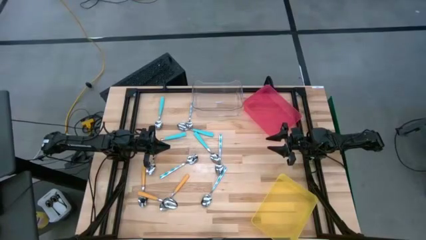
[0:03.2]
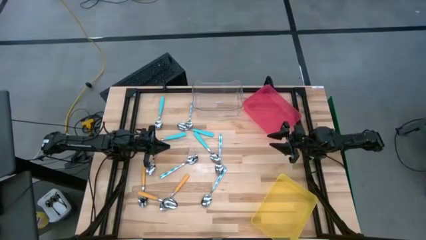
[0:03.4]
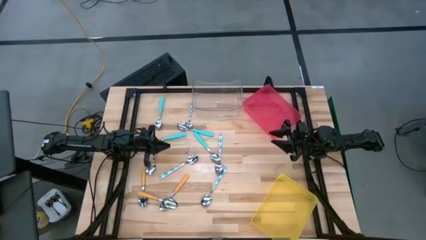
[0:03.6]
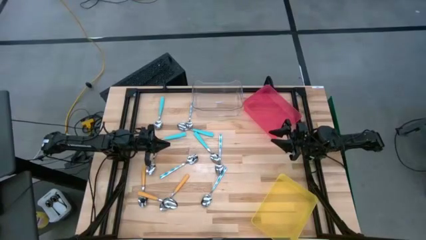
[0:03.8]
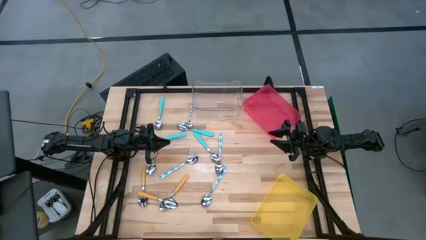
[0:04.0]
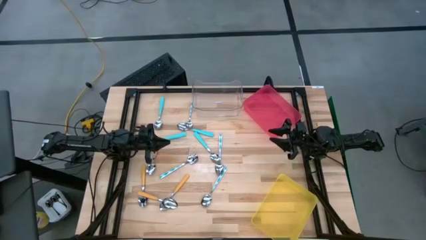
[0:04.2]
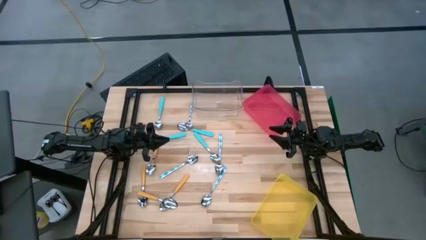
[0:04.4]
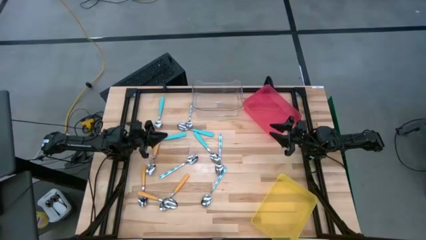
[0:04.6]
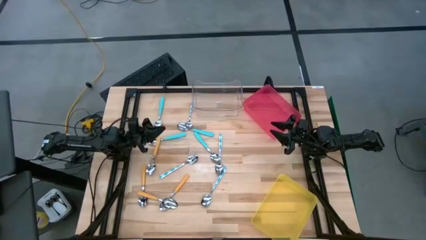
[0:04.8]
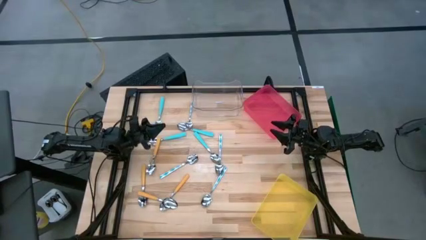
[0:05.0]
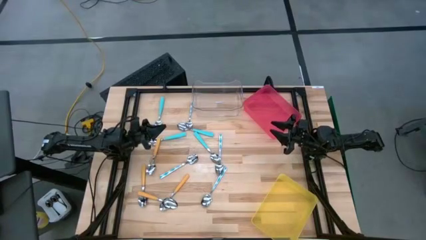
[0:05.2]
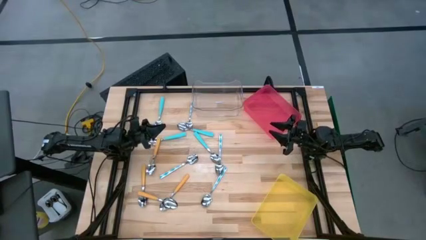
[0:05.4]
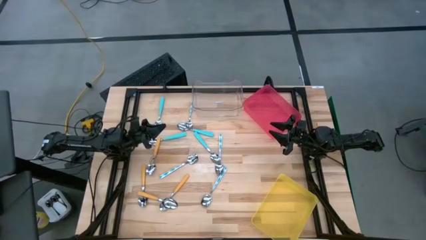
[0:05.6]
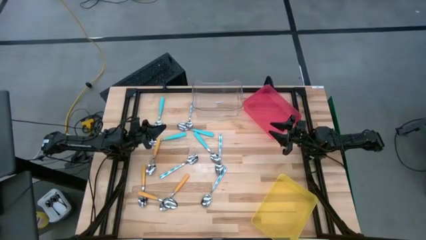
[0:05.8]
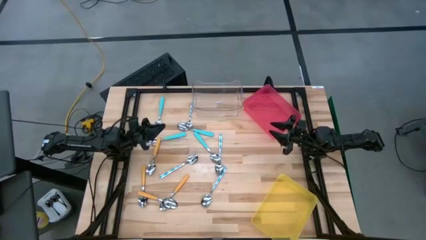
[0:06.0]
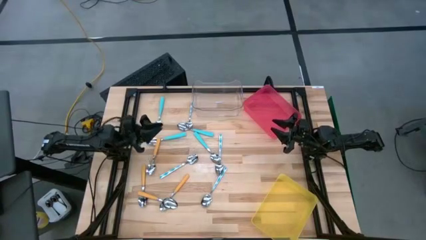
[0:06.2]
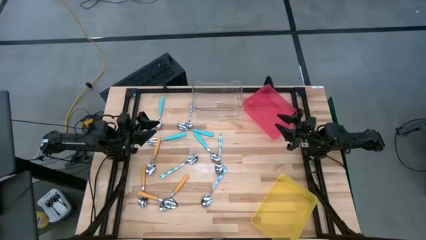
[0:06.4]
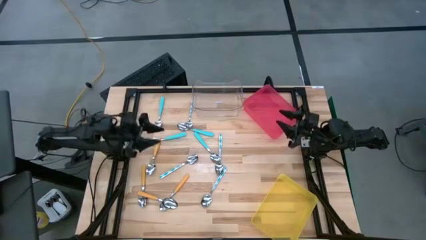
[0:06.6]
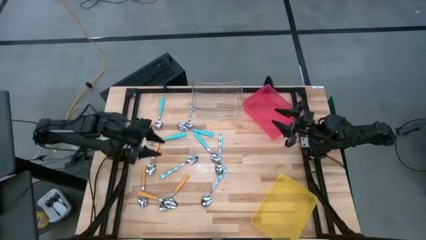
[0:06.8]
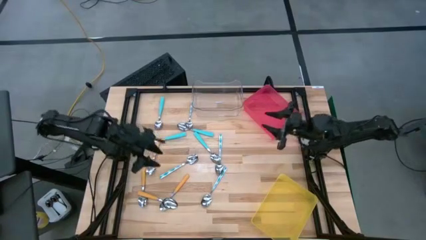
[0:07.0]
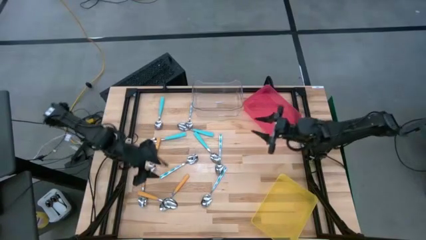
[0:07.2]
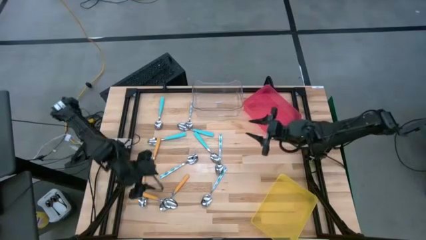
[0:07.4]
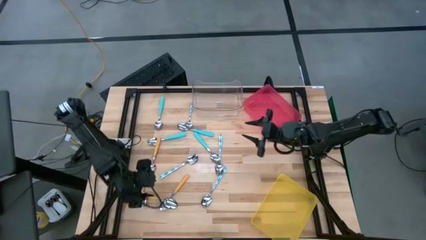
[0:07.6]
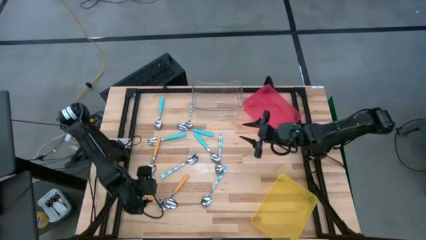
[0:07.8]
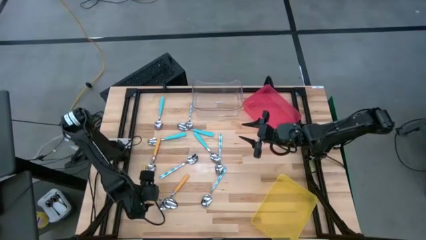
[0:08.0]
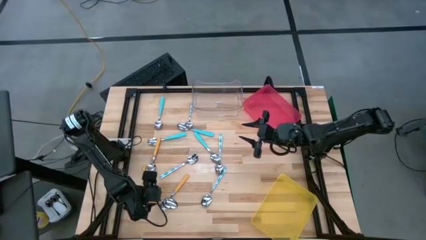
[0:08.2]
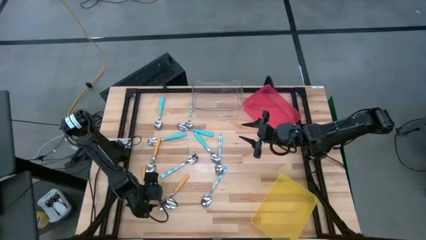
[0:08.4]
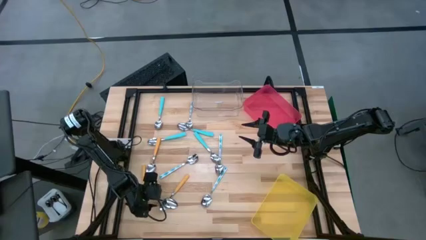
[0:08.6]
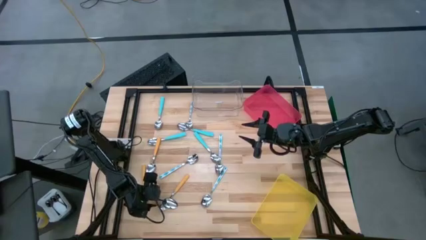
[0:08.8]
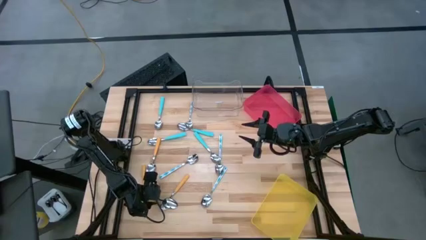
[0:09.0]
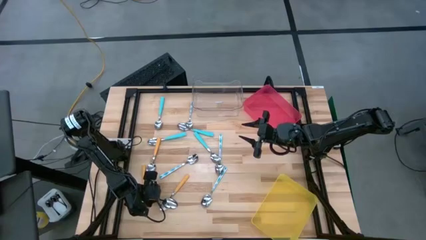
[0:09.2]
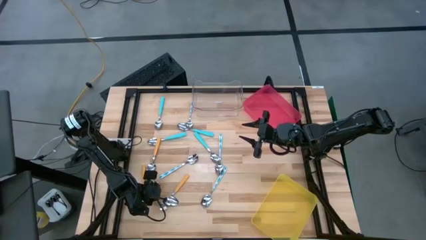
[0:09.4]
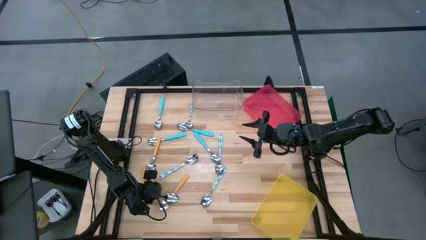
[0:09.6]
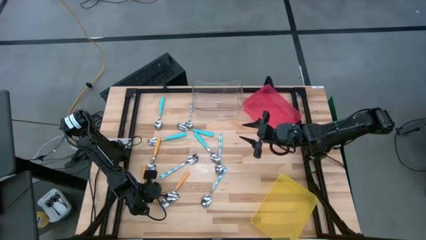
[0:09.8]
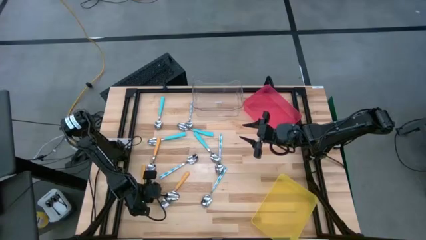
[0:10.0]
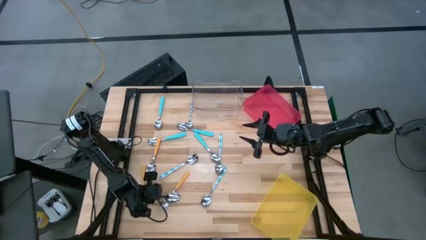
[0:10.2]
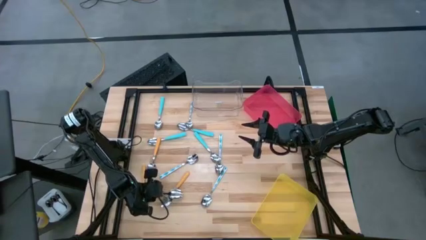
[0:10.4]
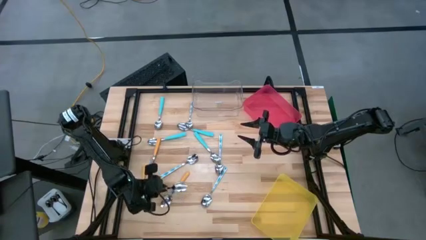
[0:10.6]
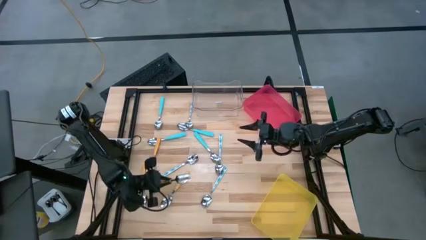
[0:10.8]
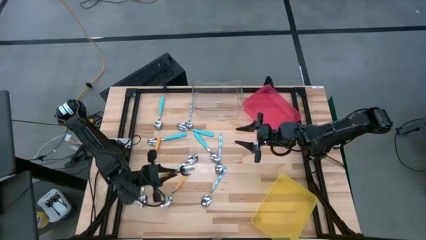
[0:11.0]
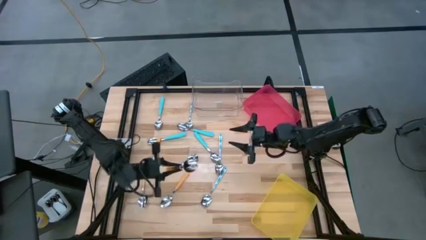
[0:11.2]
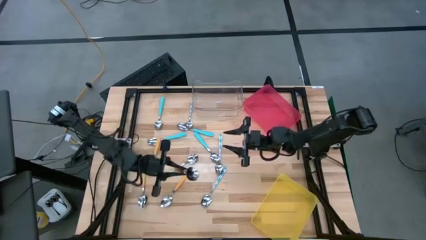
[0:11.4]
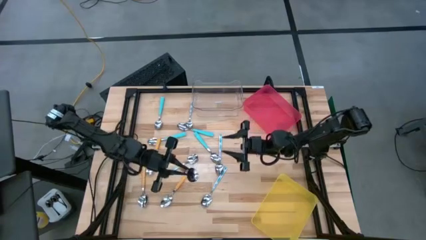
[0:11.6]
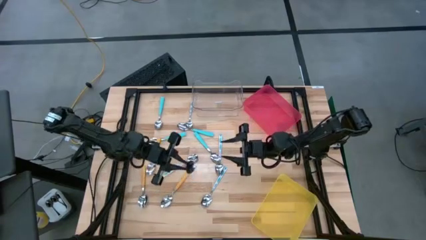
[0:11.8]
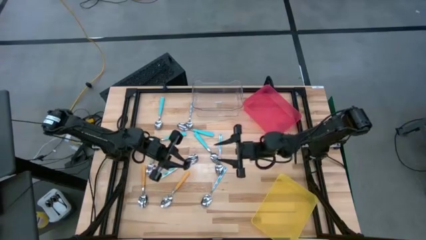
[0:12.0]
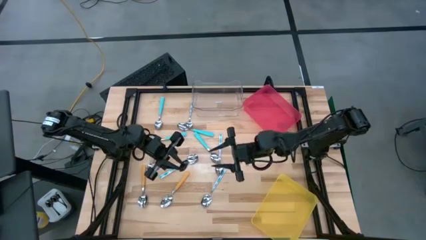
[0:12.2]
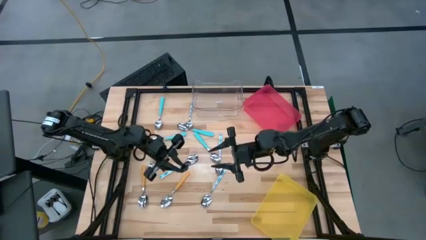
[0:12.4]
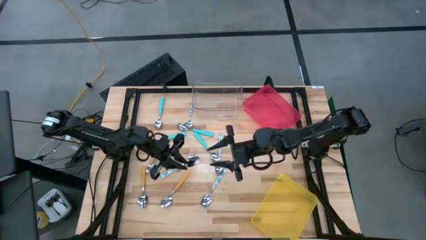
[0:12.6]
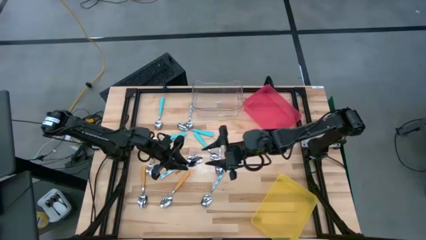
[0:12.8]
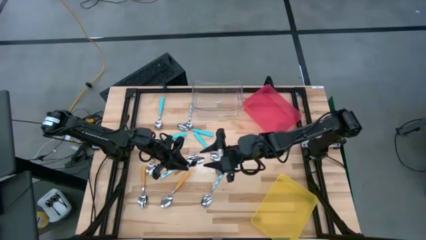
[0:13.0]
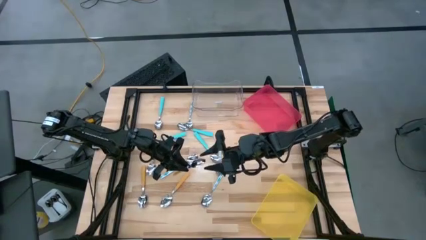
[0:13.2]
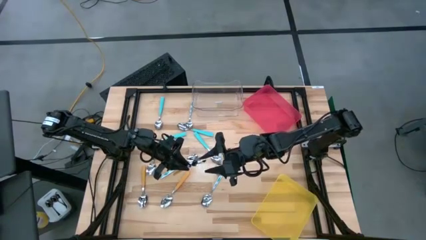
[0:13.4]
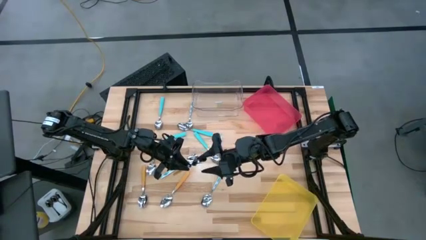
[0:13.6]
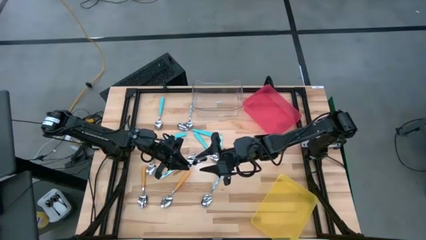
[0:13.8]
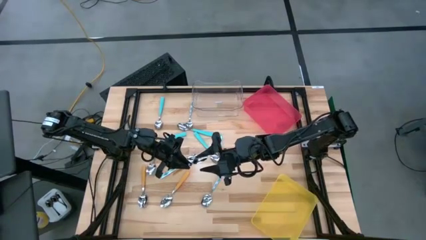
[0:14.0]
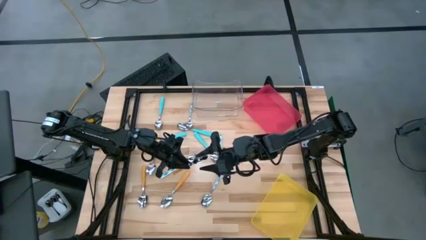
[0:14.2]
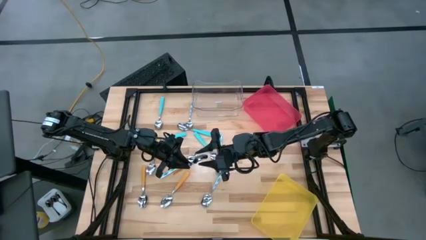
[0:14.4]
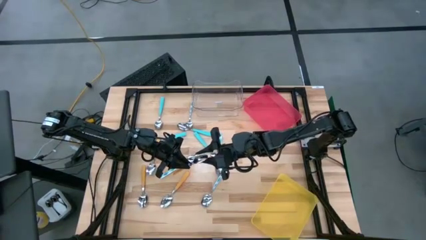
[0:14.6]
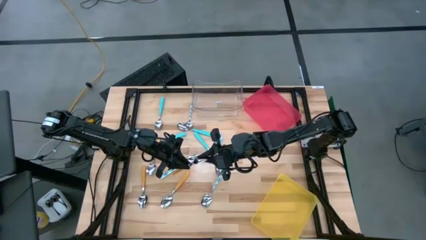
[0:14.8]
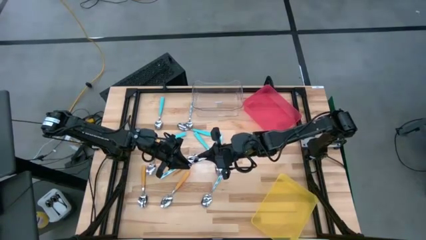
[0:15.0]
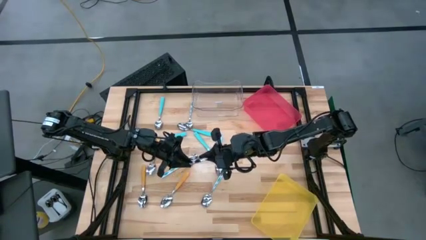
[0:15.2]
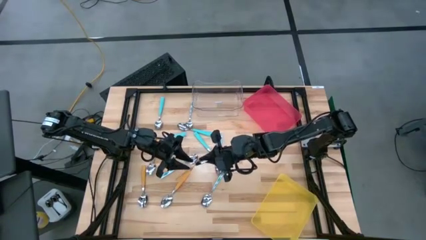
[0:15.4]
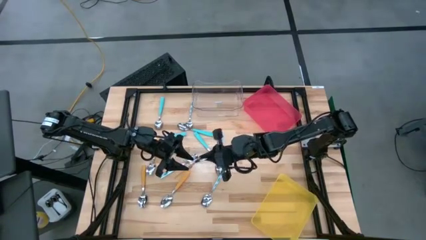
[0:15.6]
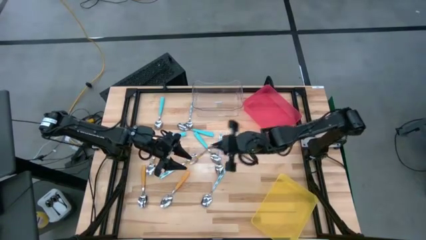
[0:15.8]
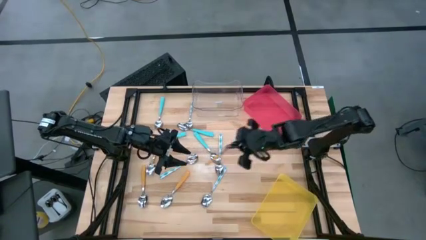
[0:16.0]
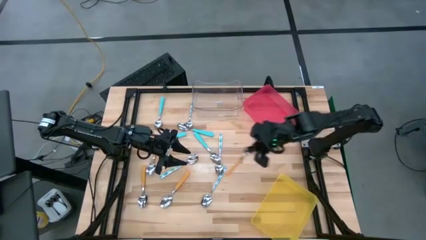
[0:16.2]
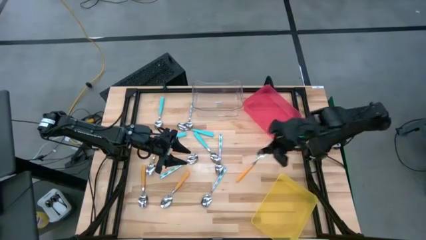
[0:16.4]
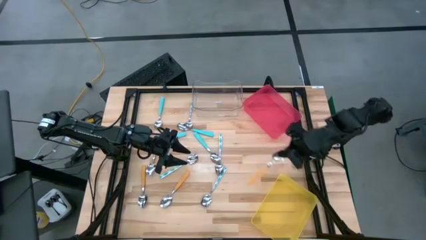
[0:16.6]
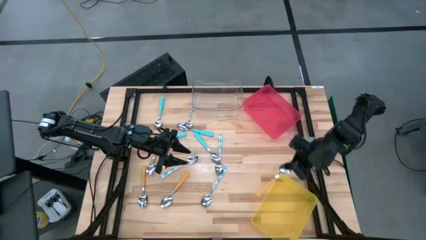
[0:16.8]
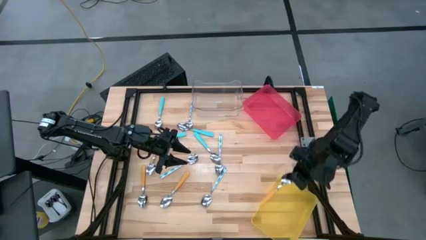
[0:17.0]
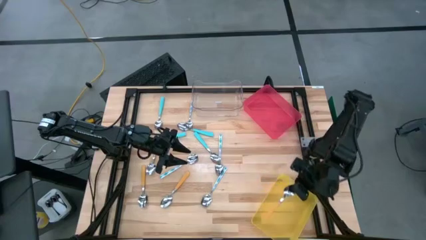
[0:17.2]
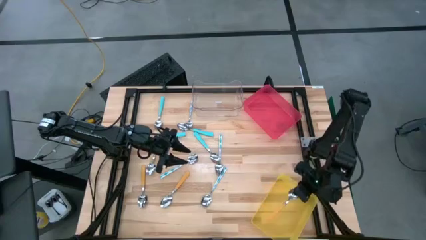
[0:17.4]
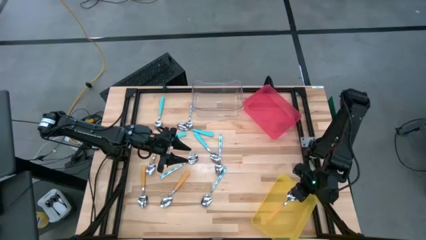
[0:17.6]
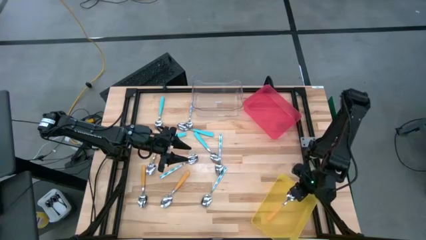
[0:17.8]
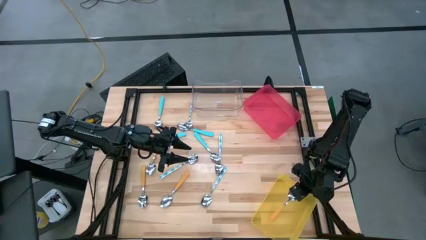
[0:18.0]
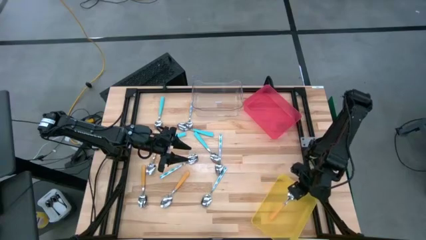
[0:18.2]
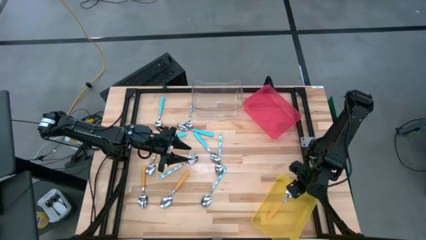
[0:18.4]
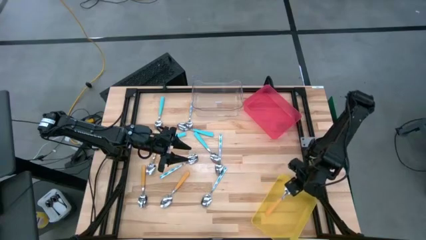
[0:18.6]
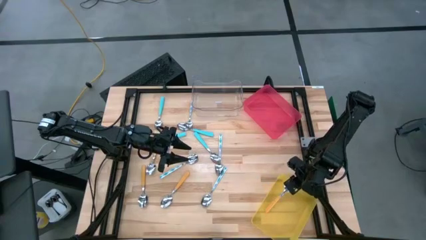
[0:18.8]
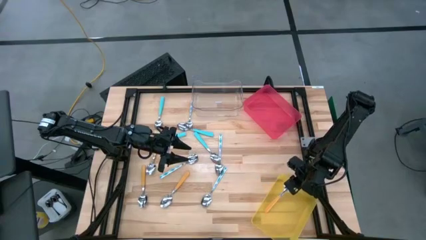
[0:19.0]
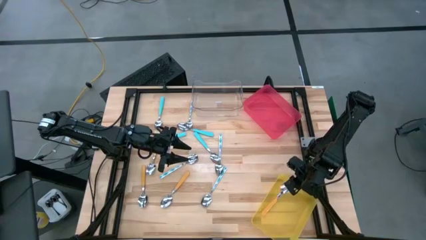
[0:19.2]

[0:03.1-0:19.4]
Task: Sort silverware by color (type)
Put the orange spoon into the yellow bin
